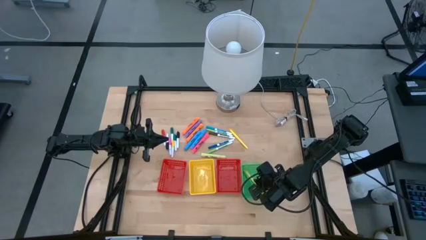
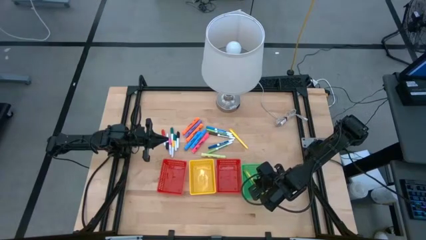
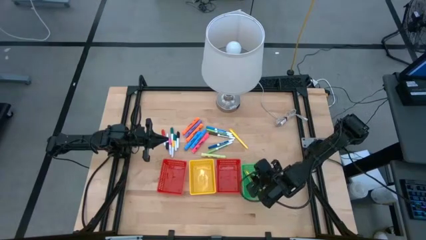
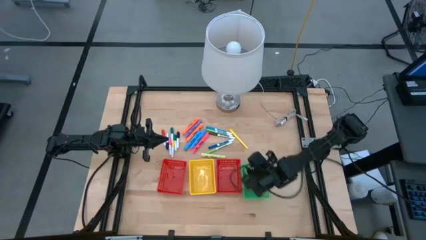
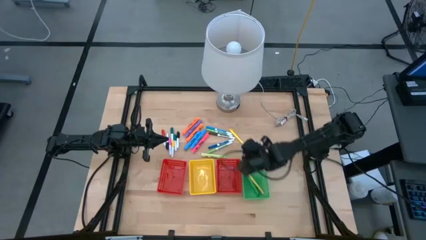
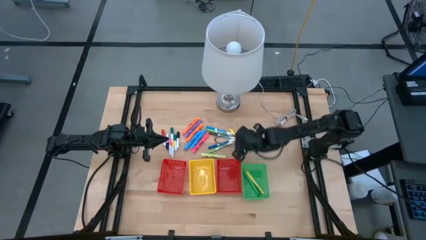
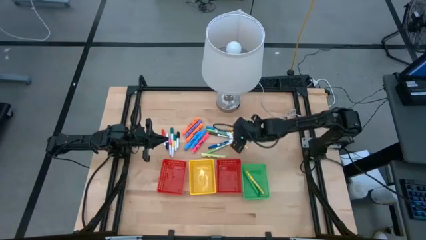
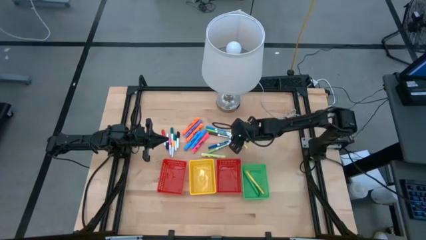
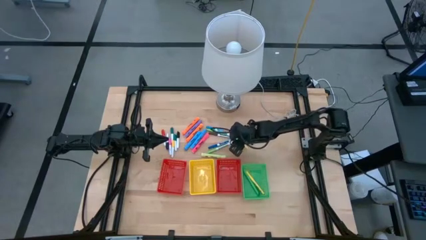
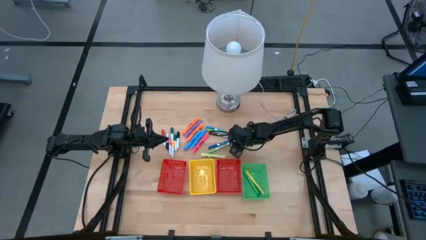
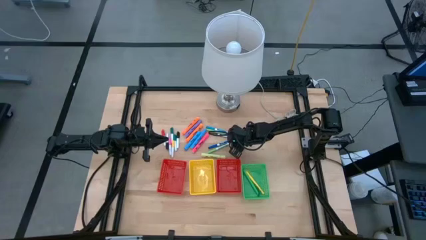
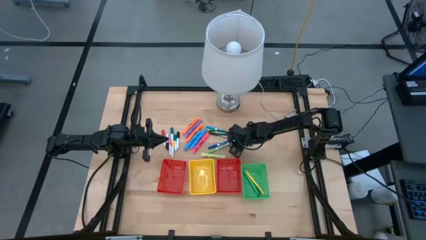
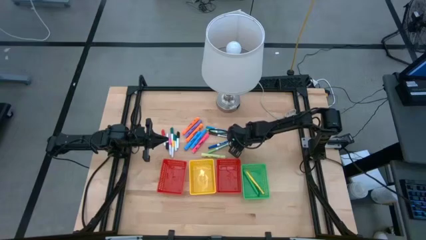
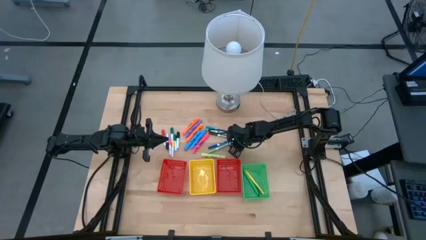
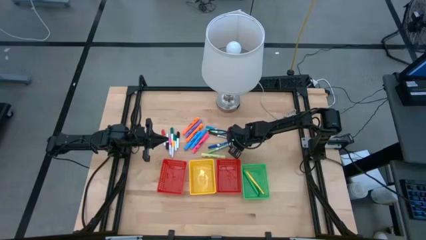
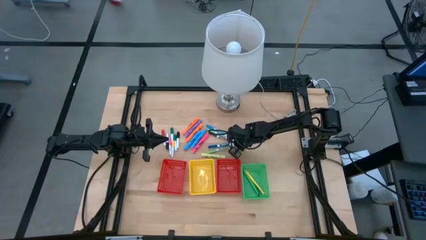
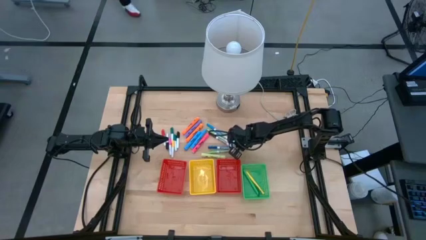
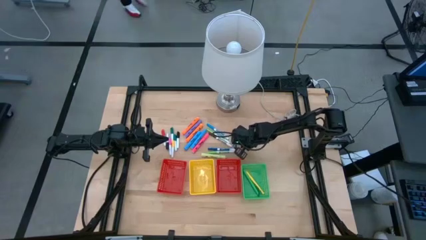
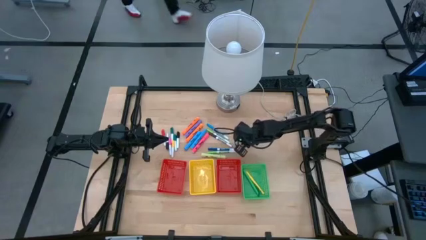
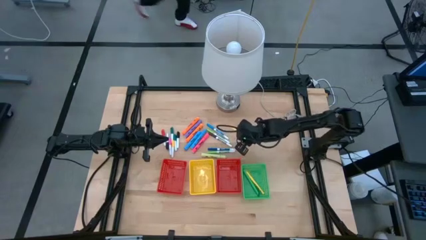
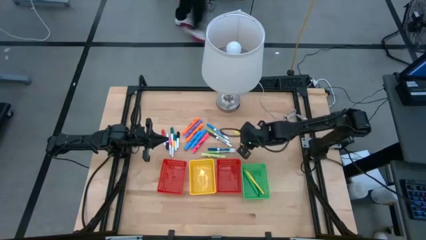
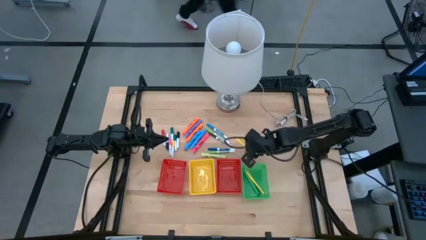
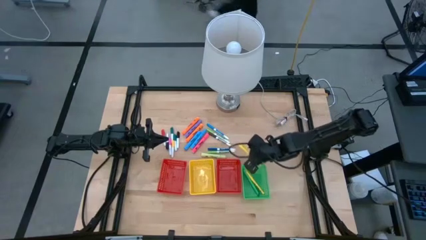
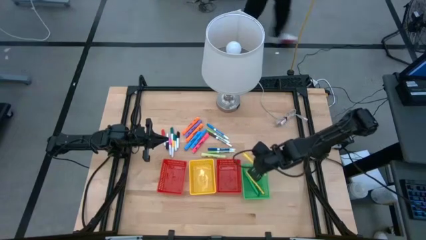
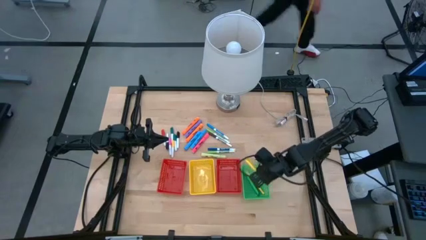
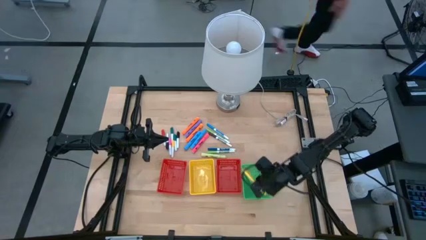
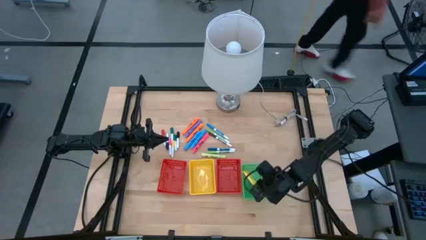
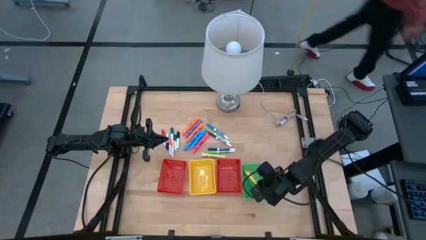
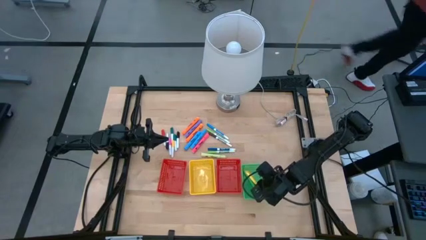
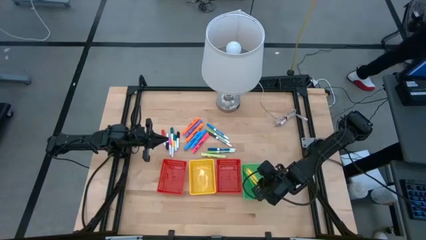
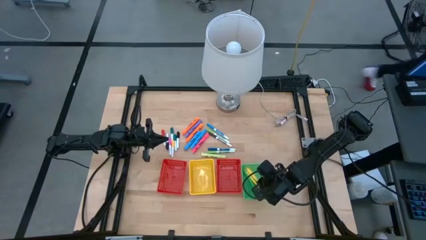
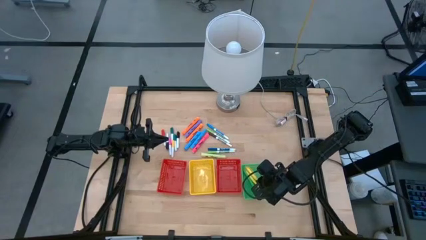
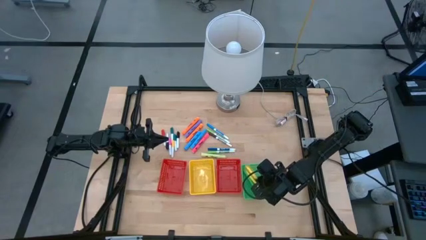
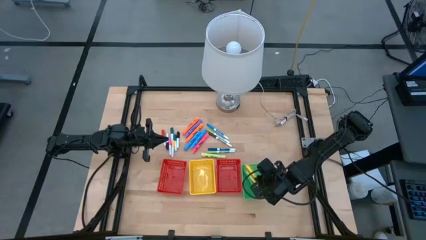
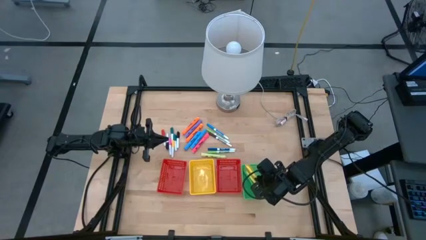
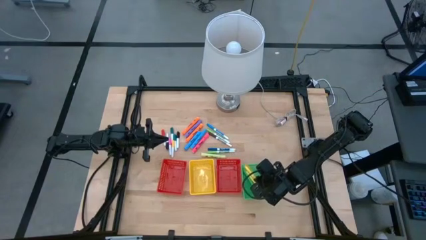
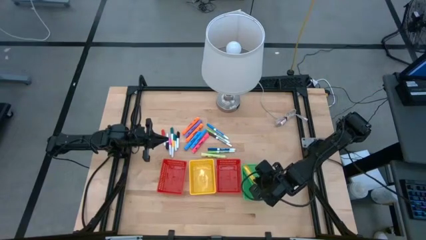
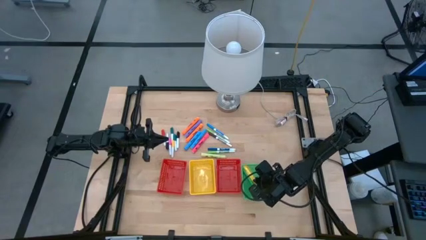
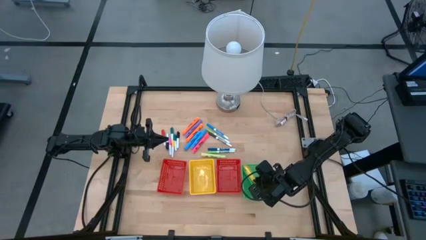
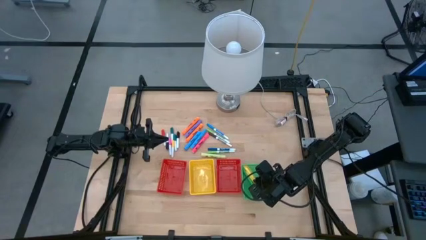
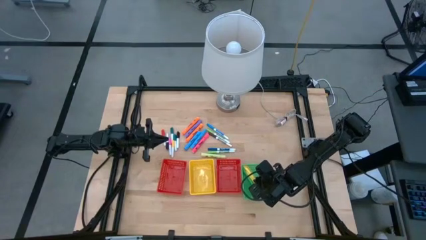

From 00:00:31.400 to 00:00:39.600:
Task: Pick & Place Markers
Put the yellow pen into the green bin
